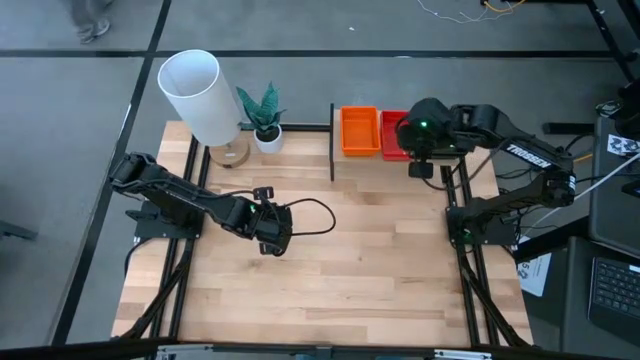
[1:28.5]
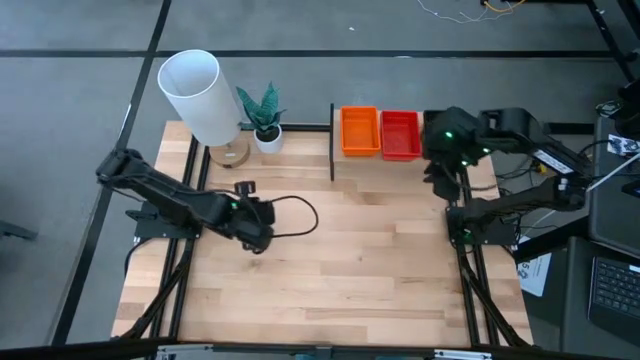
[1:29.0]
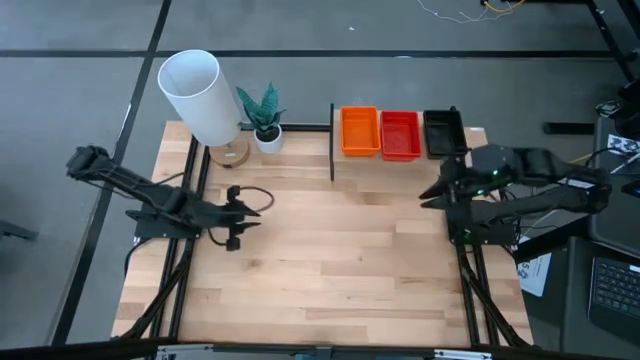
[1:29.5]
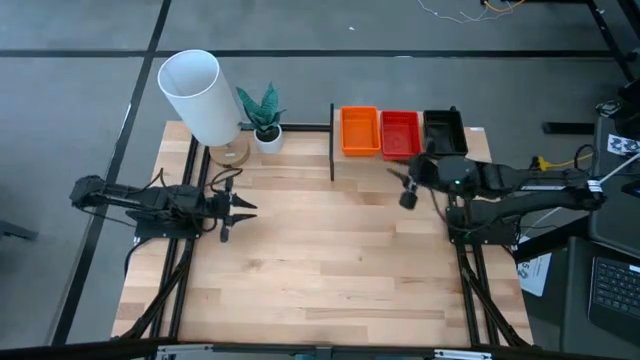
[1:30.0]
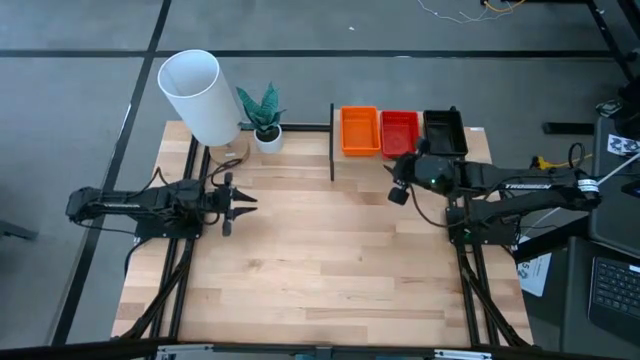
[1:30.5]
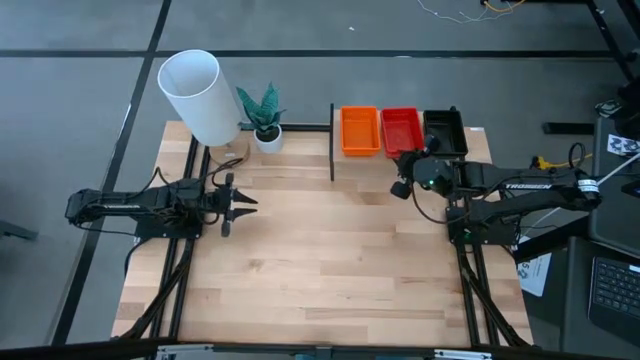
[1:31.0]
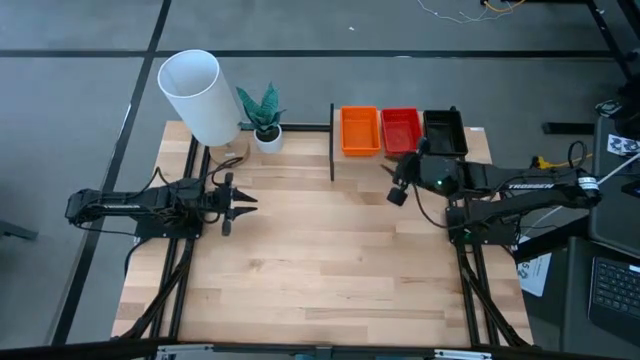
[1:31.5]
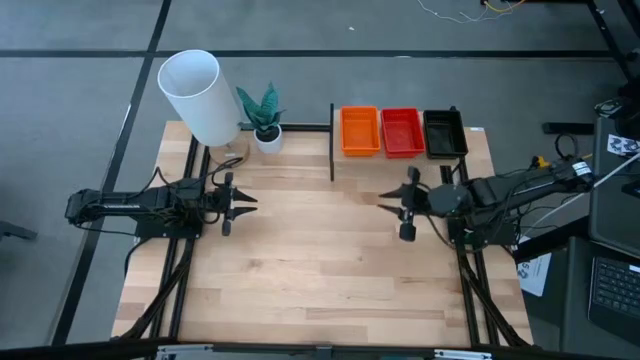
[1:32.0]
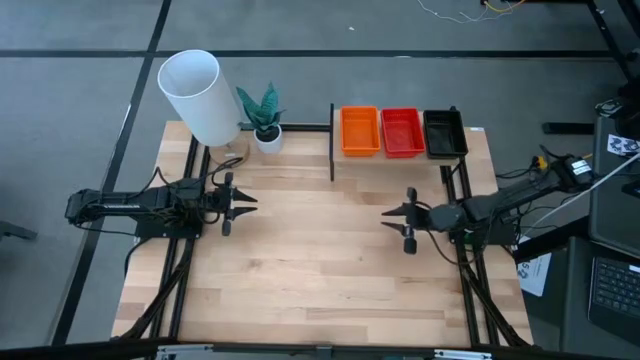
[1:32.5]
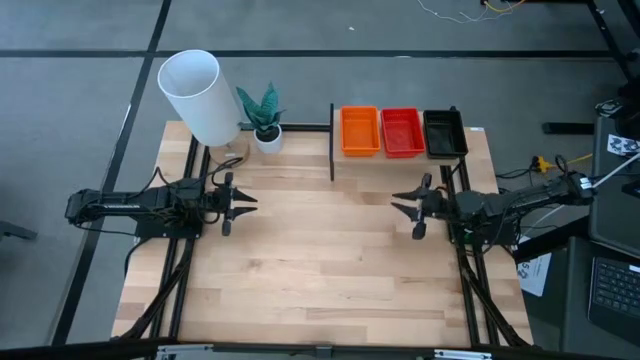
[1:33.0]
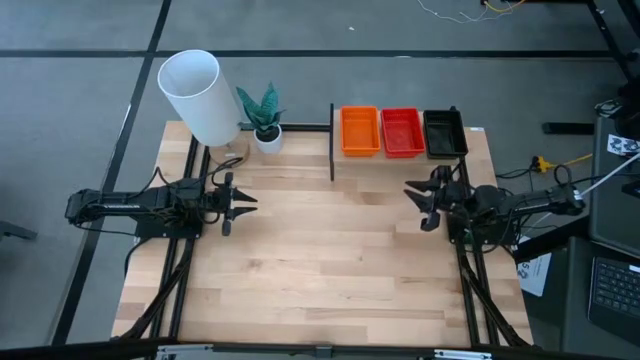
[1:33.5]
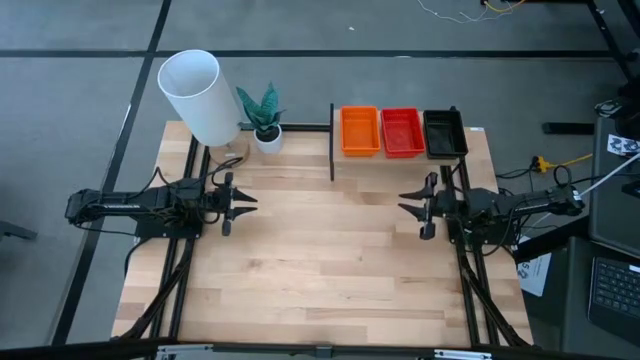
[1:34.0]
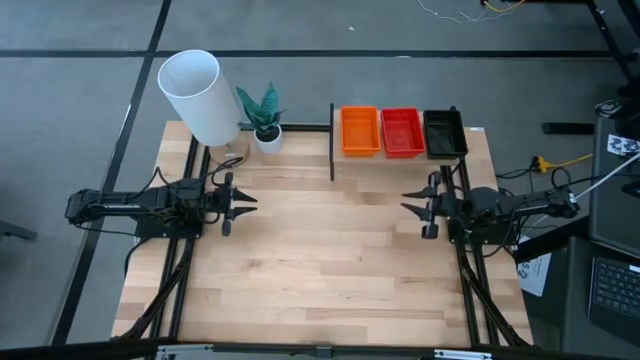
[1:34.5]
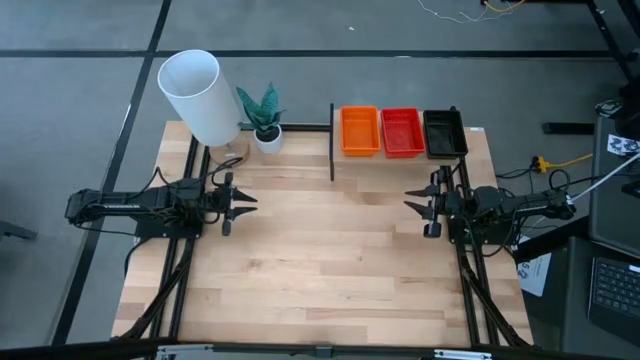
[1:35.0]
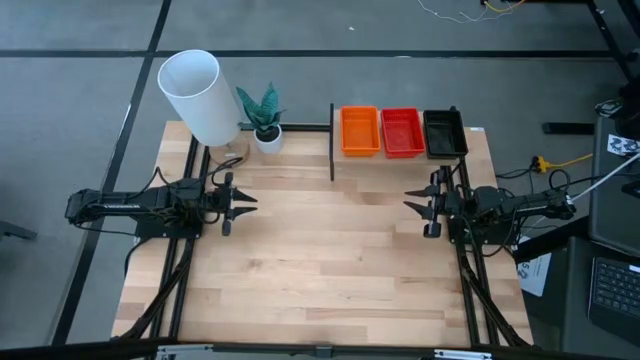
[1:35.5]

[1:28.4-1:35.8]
Task: Stack baskets on shelf by color
Return to Home Position

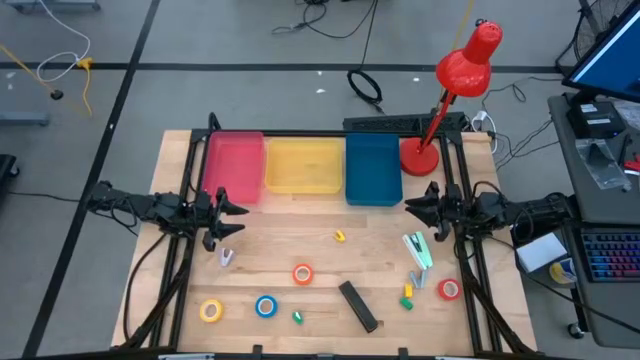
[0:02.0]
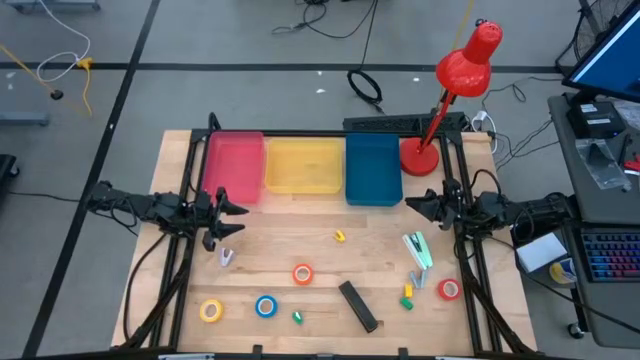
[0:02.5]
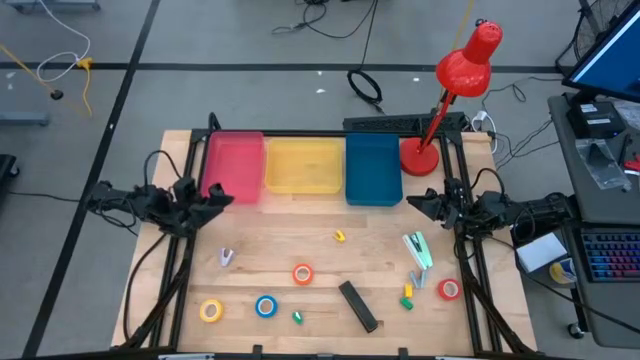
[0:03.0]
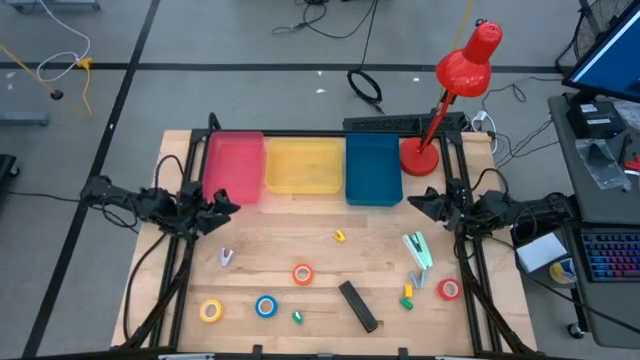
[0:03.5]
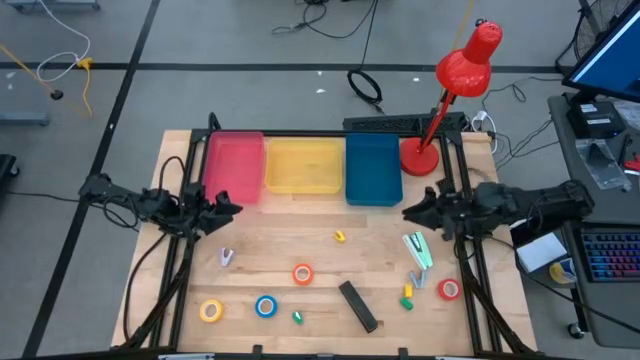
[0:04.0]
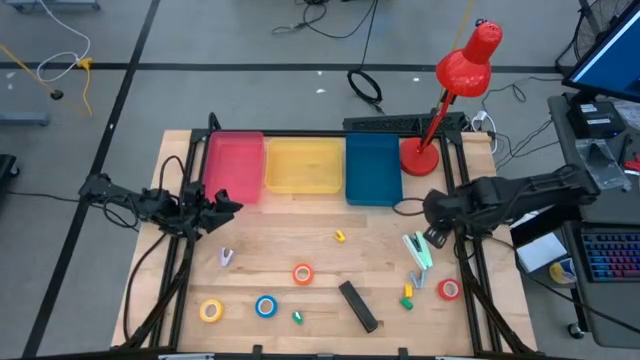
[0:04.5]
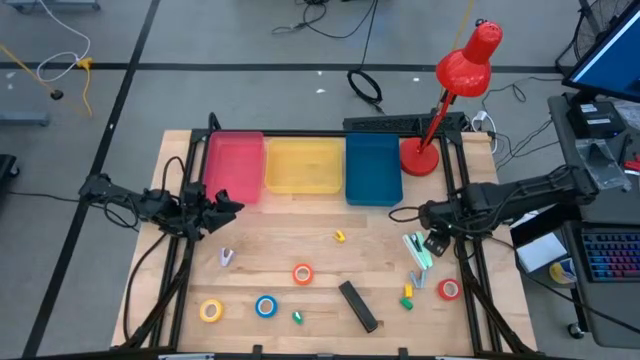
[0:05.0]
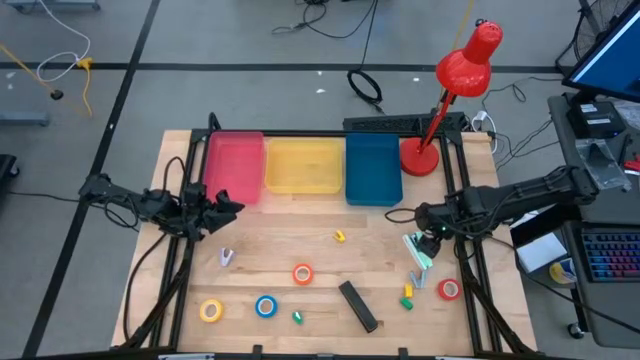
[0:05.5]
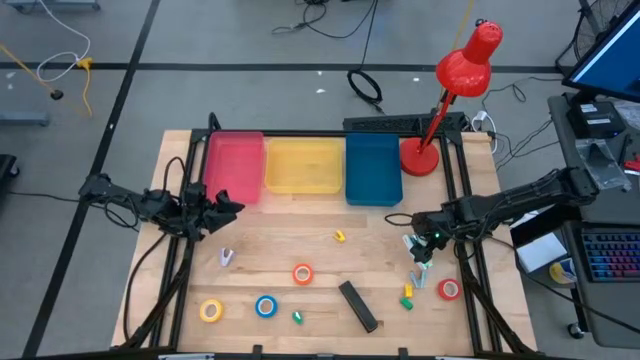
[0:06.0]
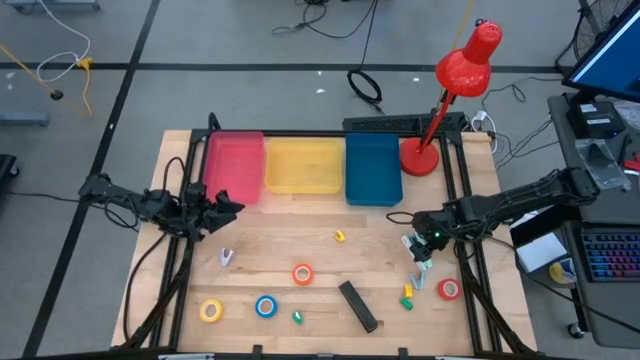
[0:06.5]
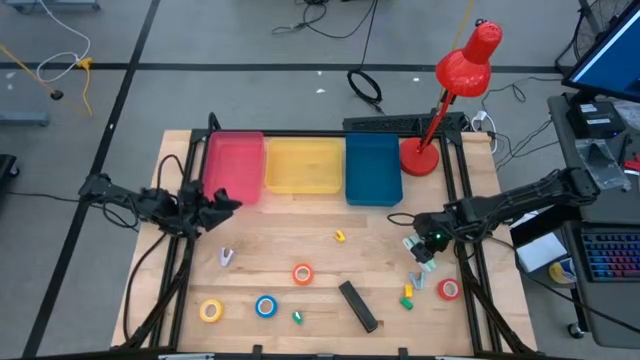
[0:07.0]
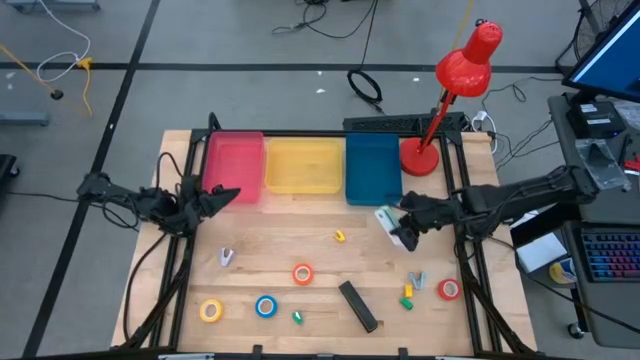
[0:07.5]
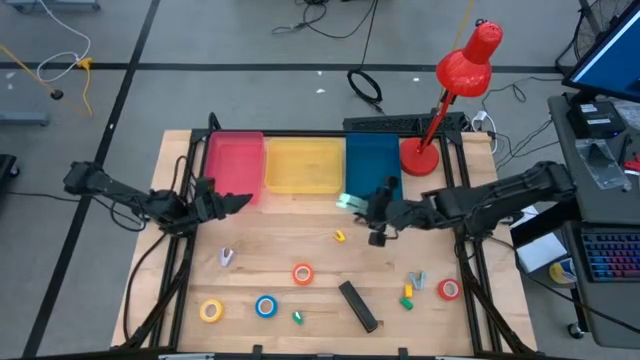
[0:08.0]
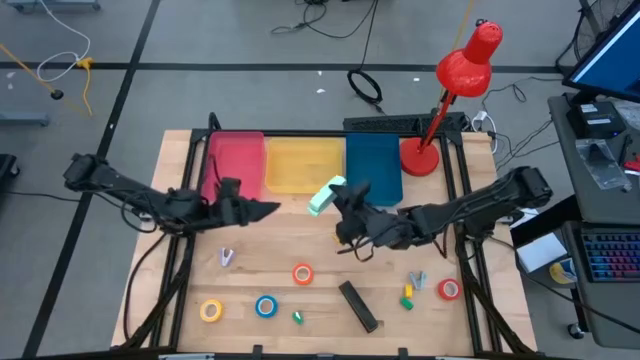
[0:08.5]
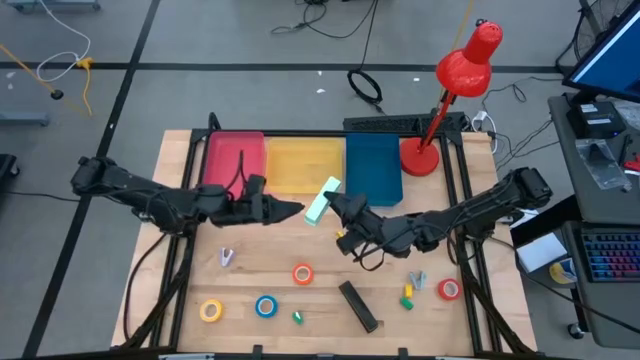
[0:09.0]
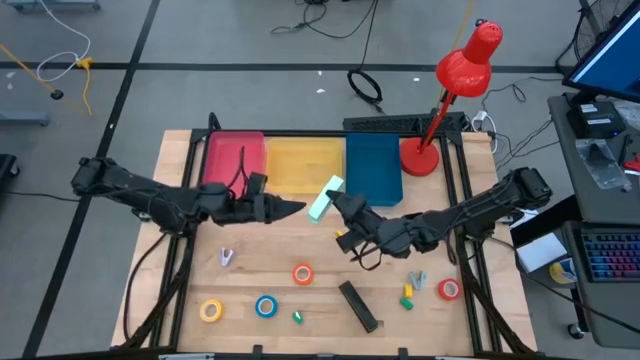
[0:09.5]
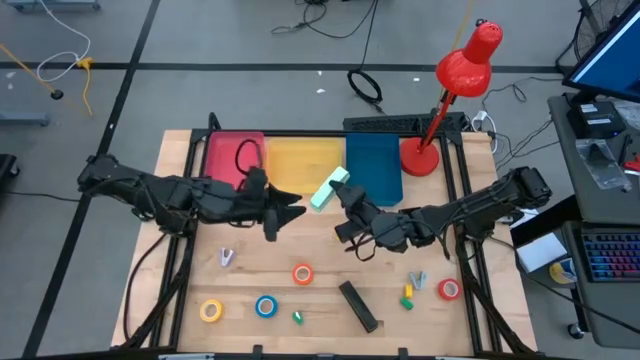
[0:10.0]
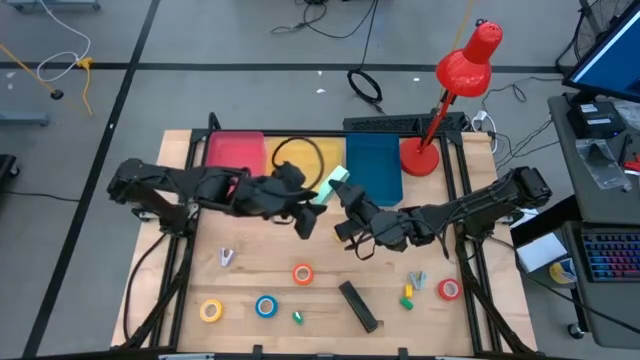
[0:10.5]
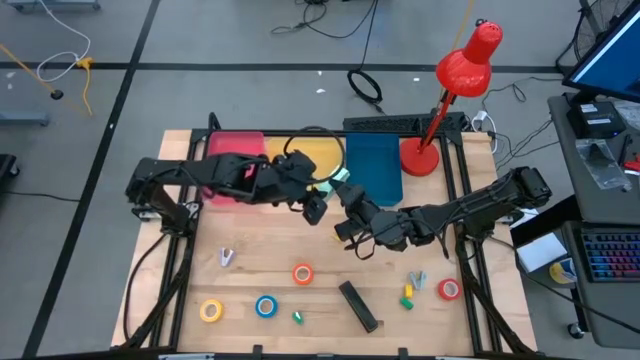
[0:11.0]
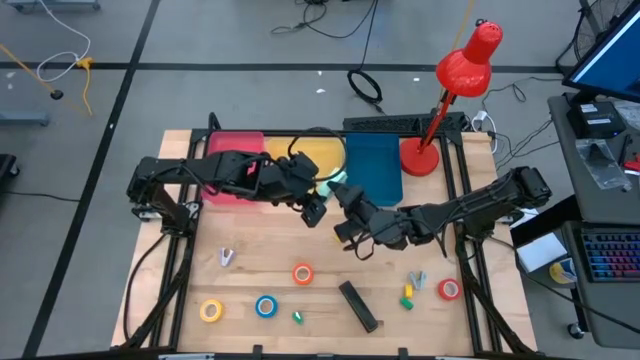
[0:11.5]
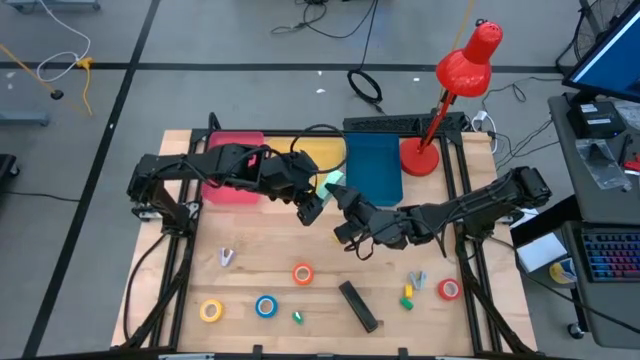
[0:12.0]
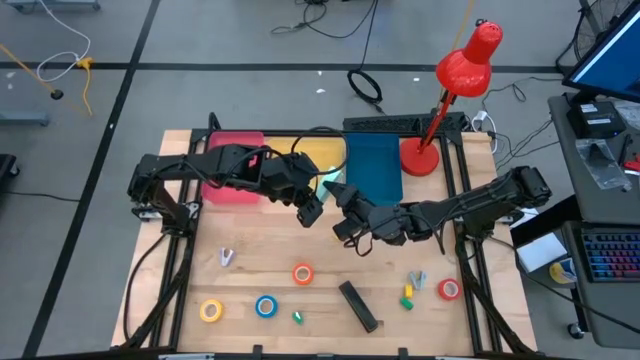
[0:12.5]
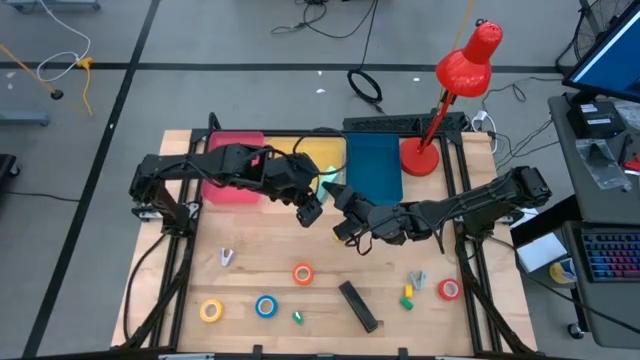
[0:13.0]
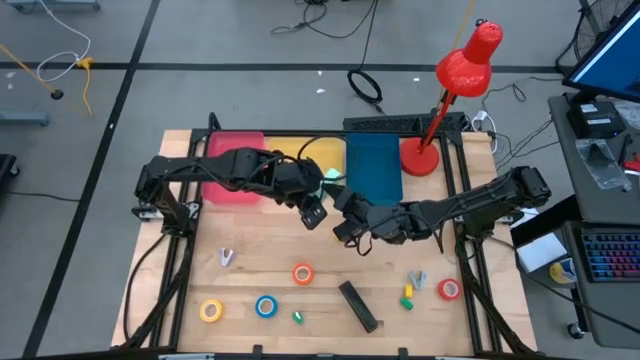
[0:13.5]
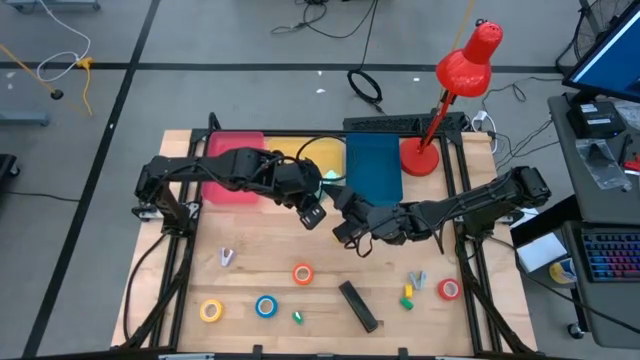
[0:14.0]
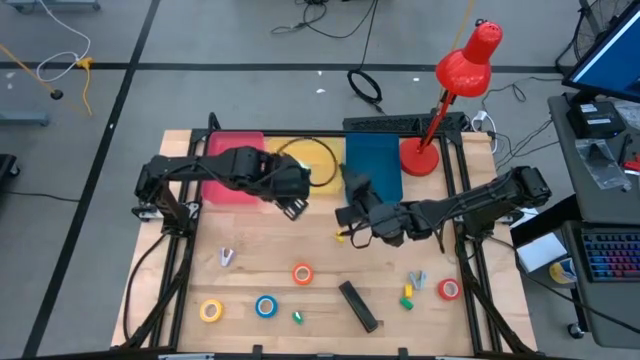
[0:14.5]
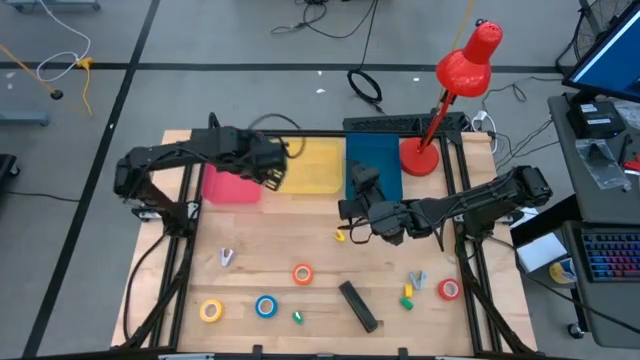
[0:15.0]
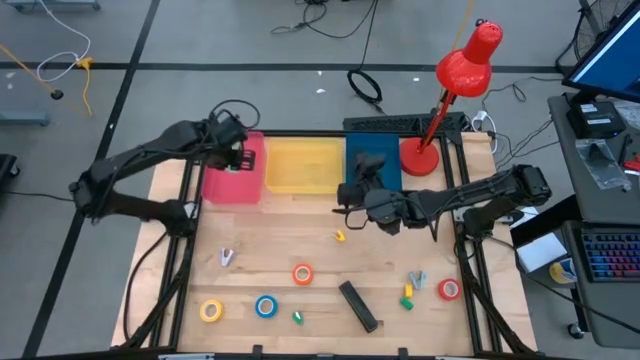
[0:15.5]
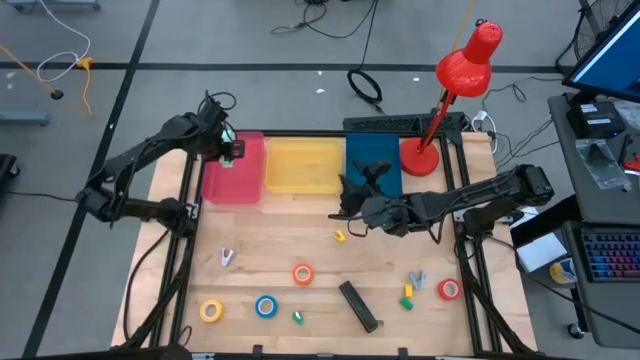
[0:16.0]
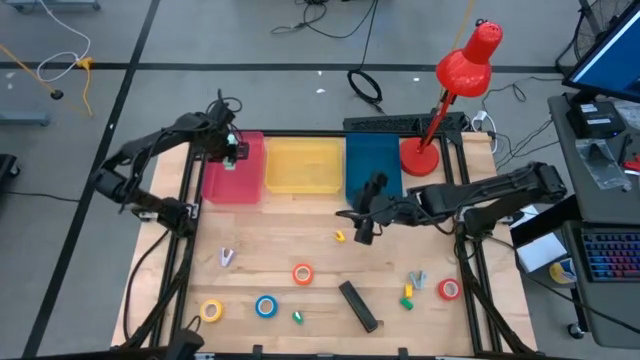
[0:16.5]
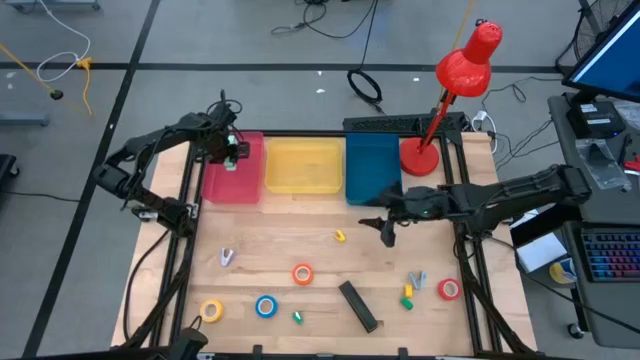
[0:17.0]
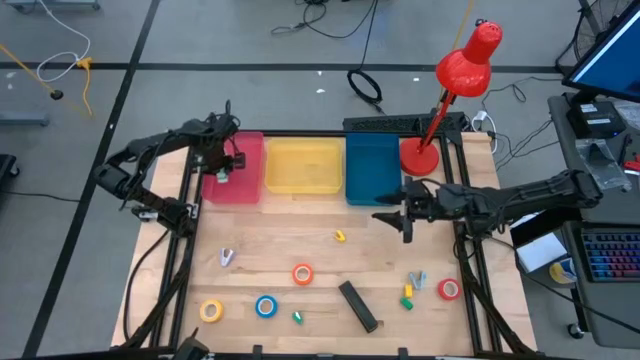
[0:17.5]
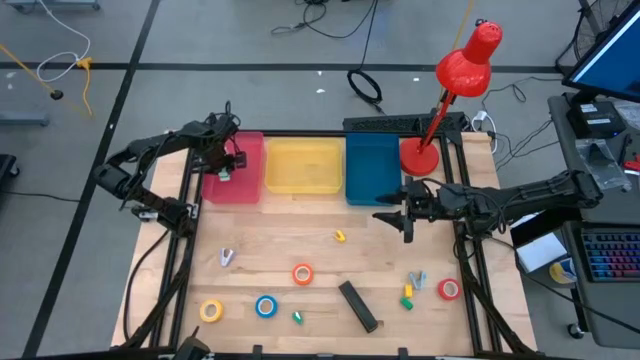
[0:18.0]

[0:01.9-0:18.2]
Task: Pick and place Stapler, Stapler remover, tape
Put the green stapler into the red bin
